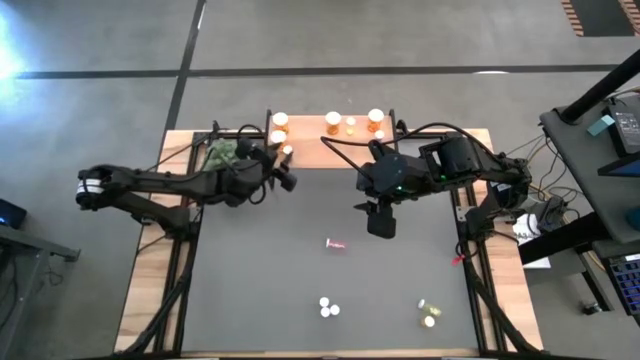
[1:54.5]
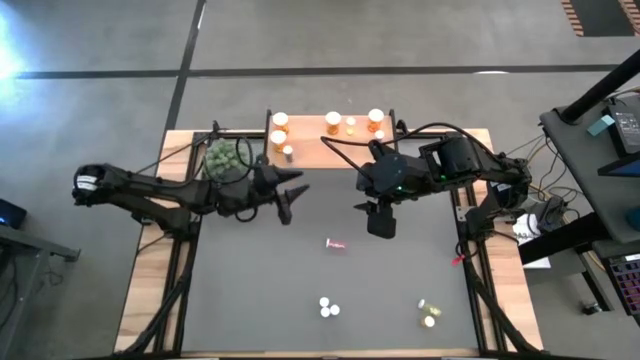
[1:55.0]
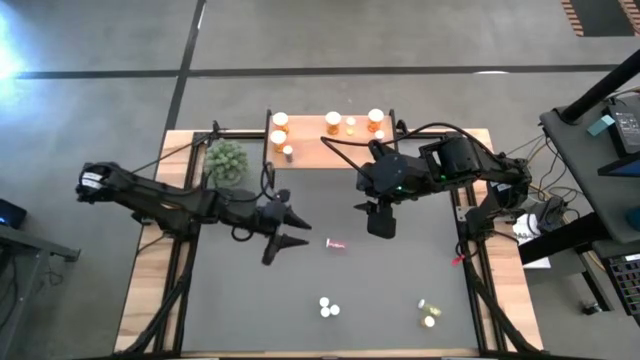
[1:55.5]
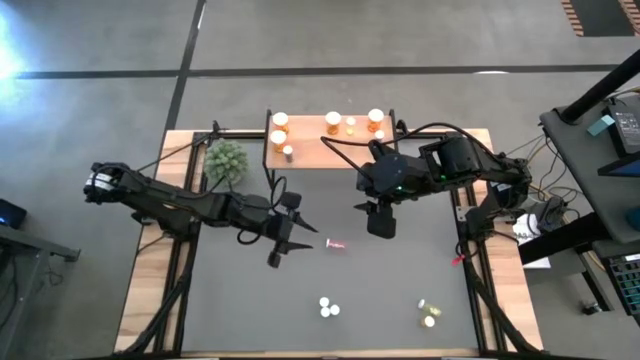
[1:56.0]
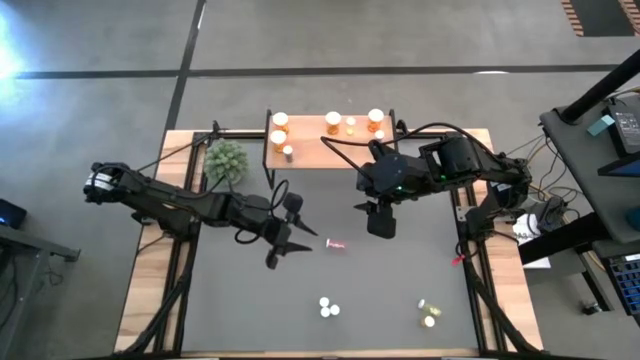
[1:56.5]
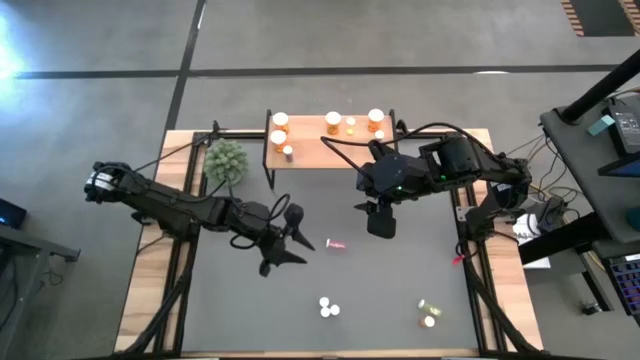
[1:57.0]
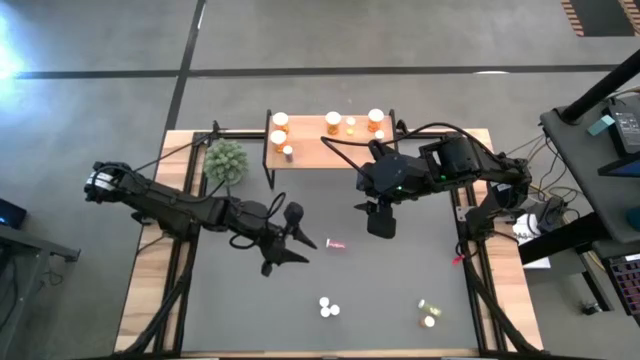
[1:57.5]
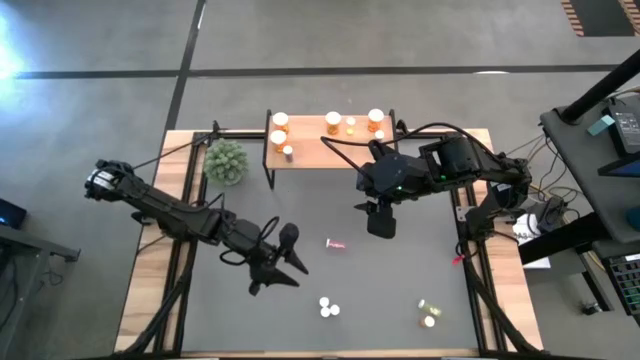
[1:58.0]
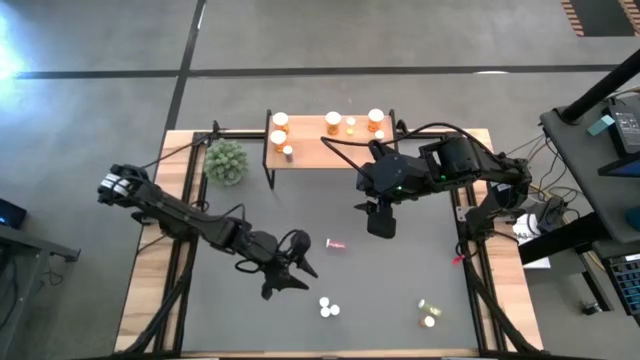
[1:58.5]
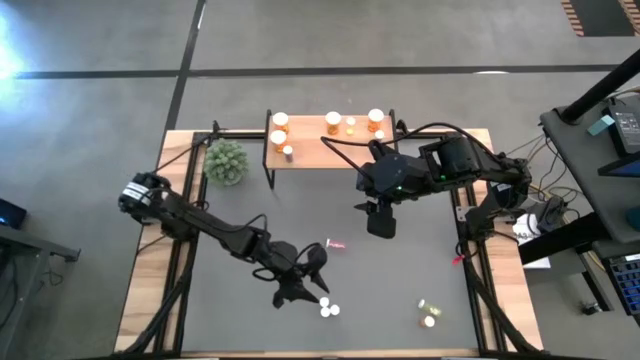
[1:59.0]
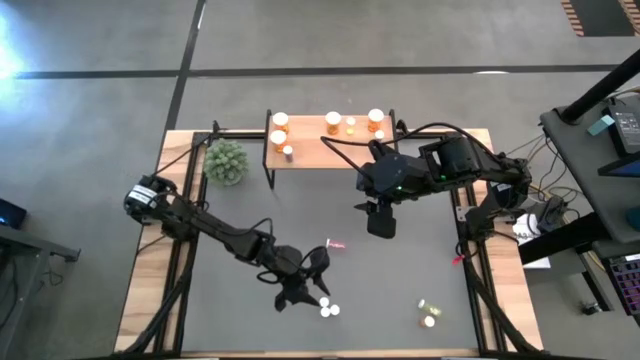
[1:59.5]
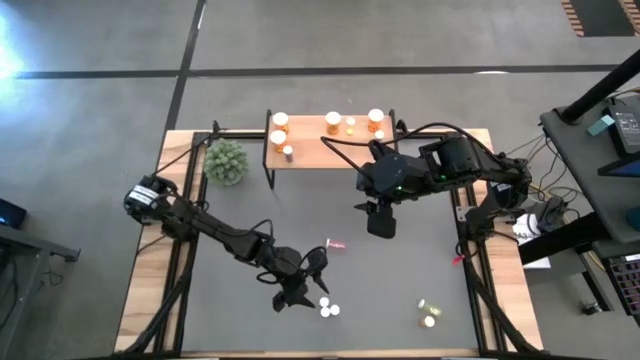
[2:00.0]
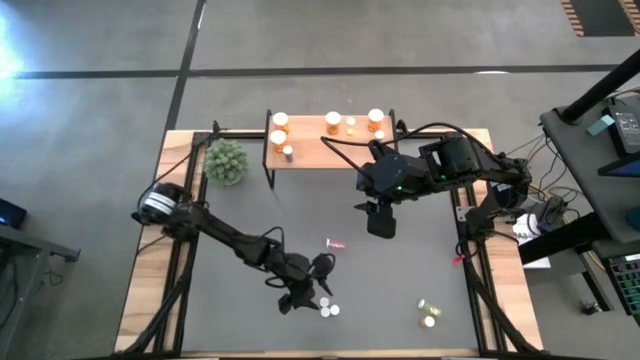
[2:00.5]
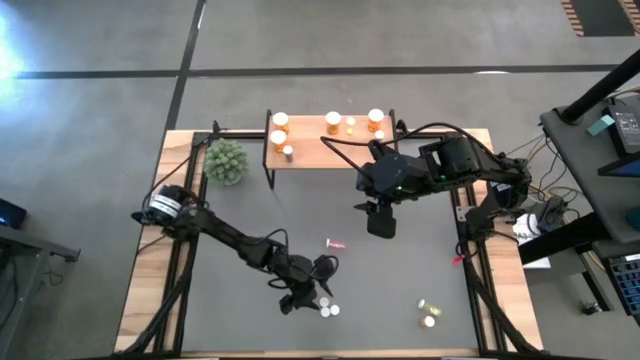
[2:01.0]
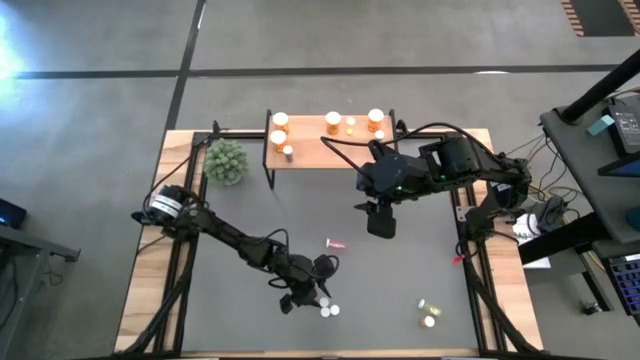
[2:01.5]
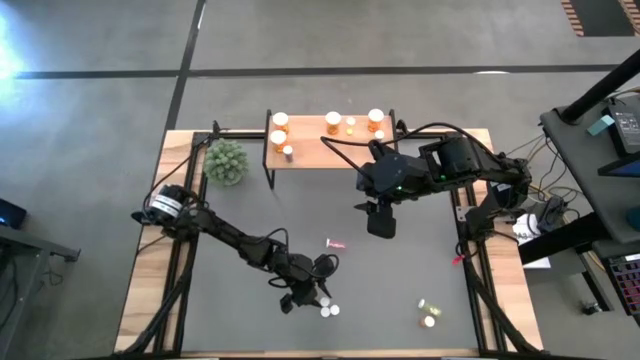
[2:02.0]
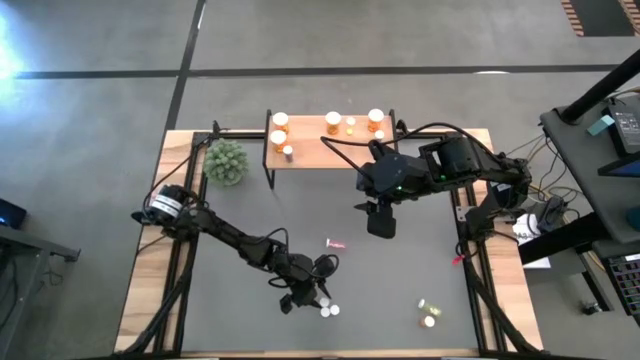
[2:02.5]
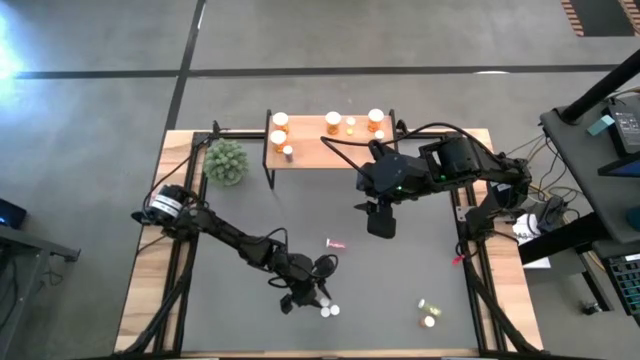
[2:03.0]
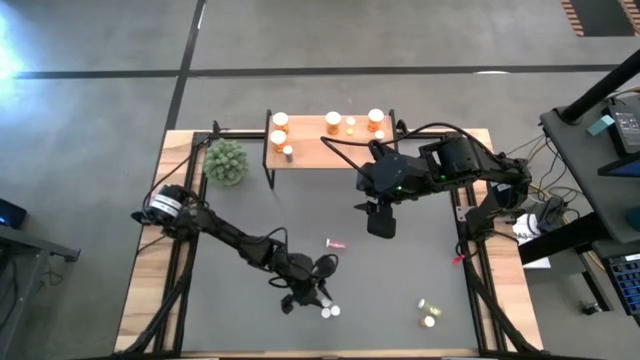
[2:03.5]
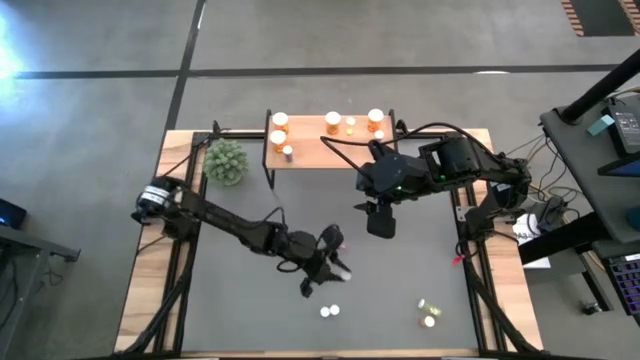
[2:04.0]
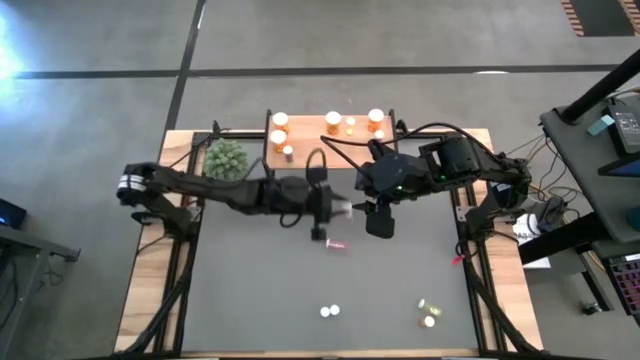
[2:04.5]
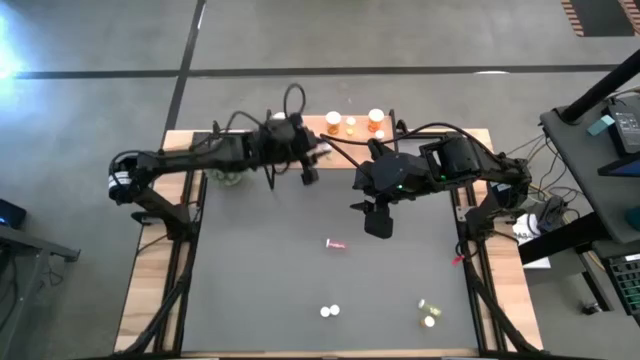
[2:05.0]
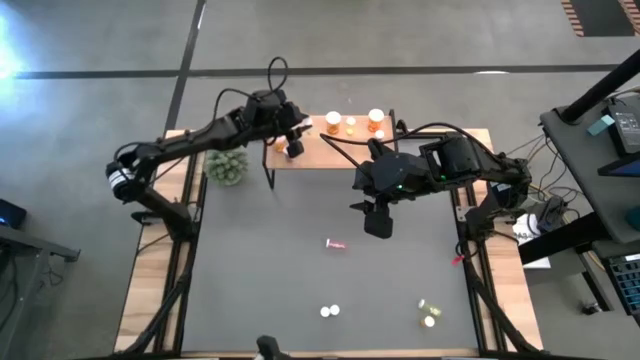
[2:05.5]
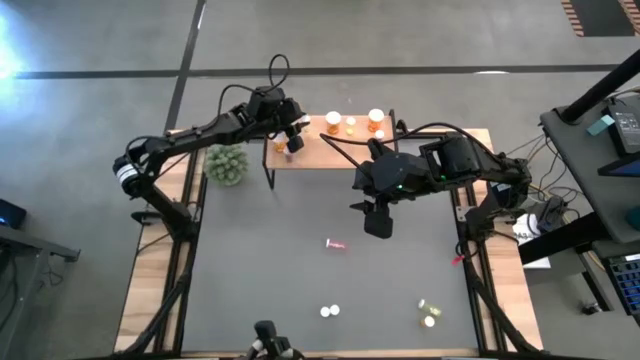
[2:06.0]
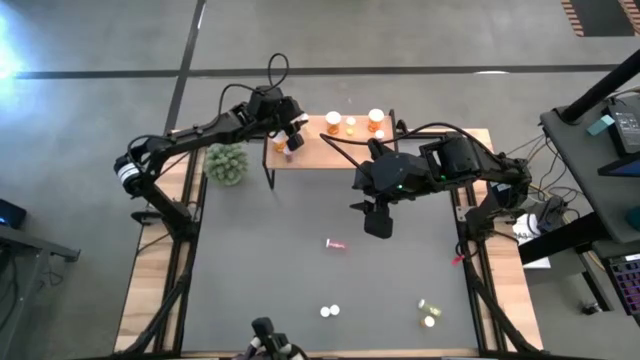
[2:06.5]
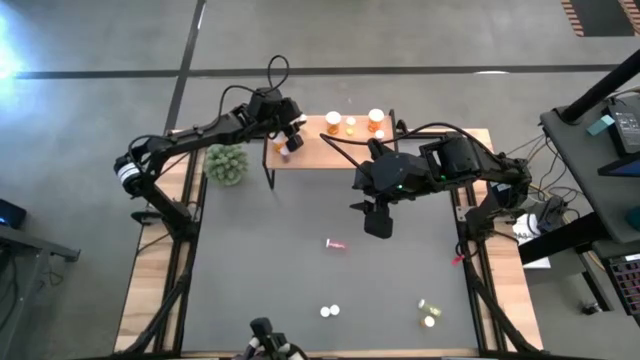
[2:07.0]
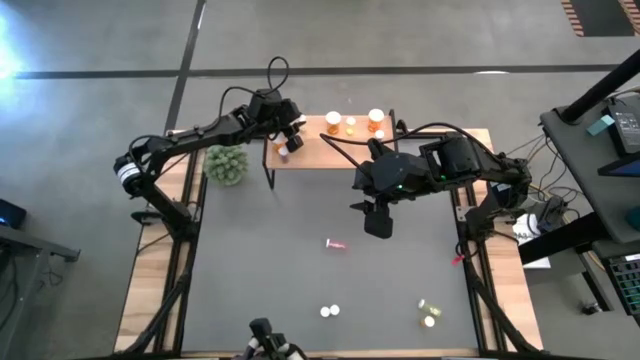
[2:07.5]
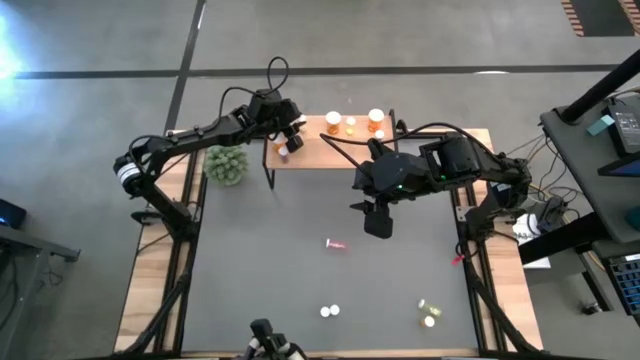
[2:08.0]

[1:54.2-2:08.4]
Task: Pick and place medicine bottles onto shelf by color
Put the small yellow pill bottle on the shelf

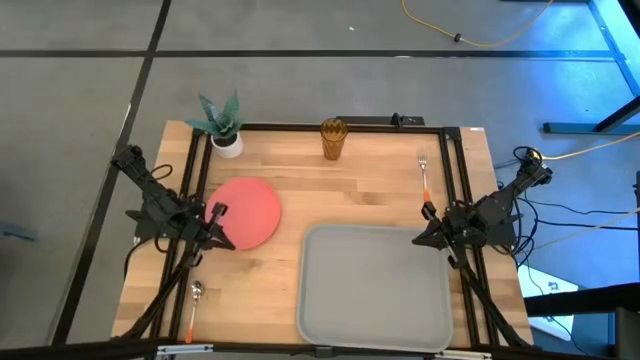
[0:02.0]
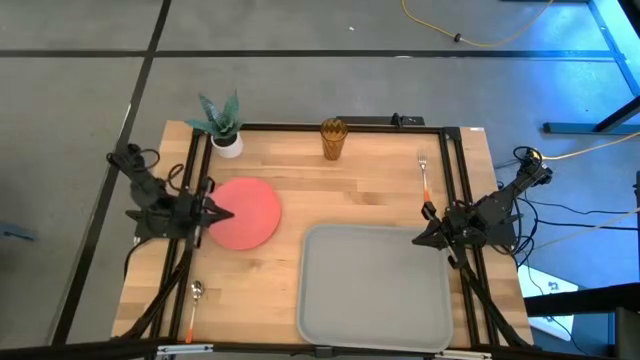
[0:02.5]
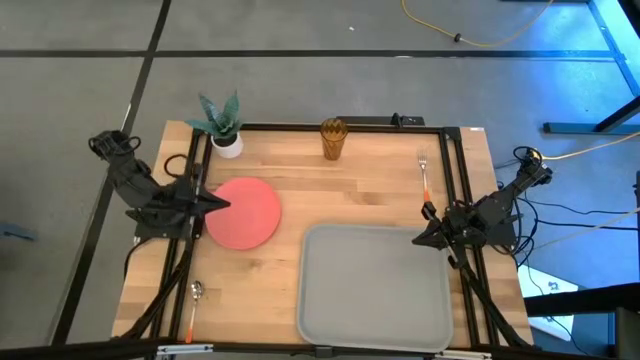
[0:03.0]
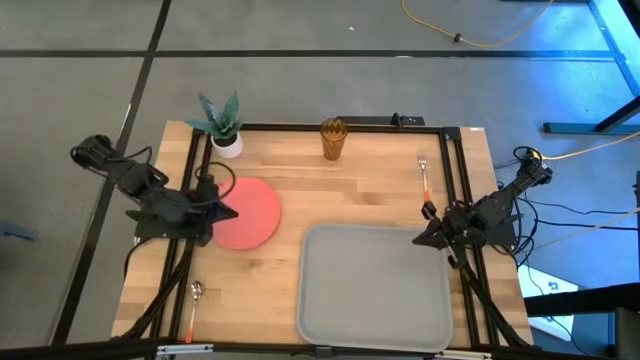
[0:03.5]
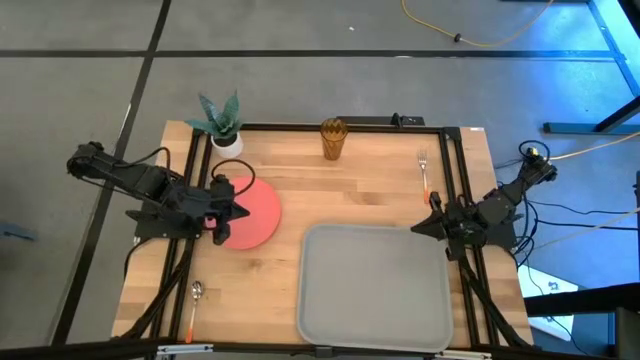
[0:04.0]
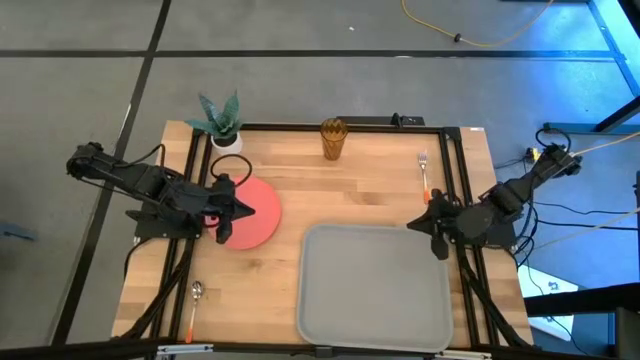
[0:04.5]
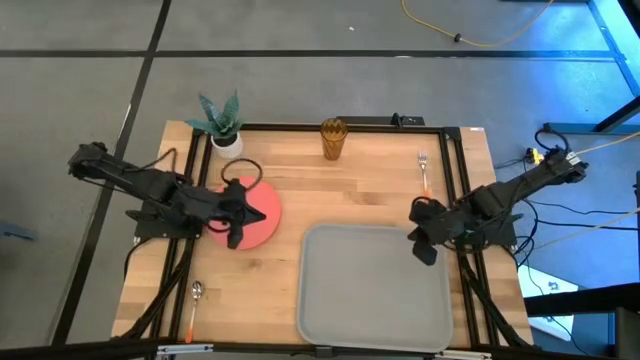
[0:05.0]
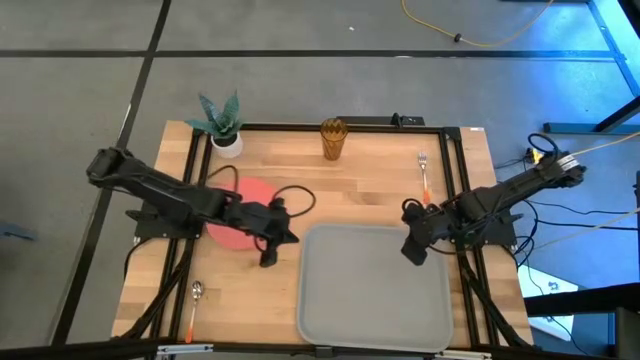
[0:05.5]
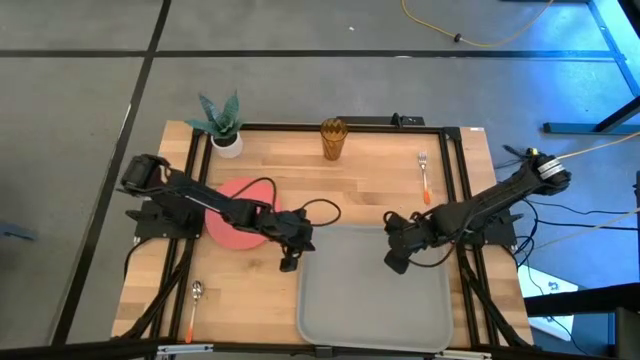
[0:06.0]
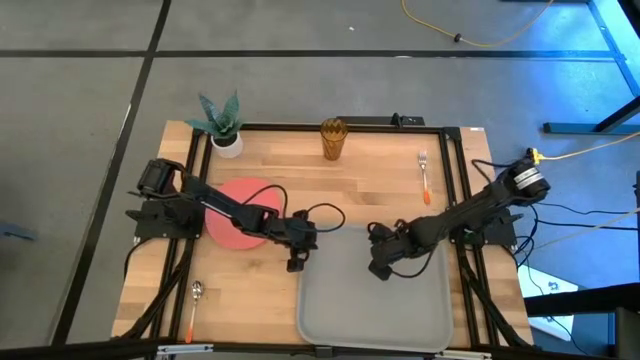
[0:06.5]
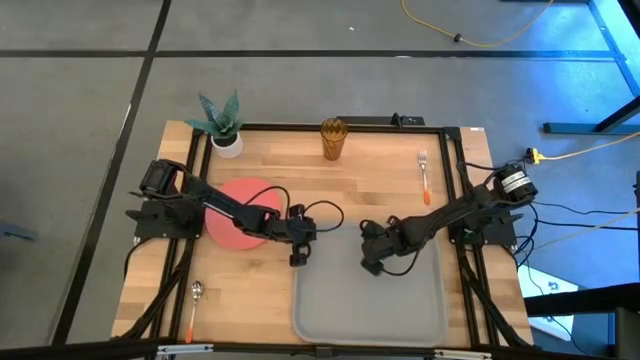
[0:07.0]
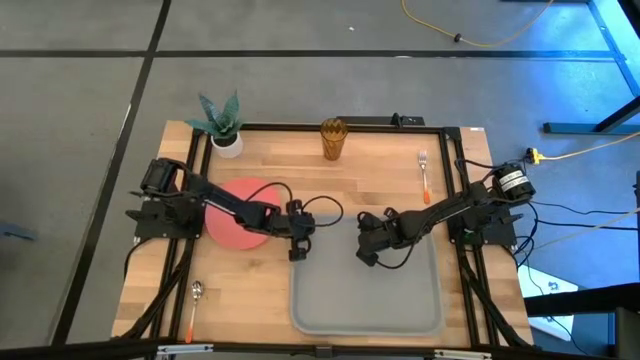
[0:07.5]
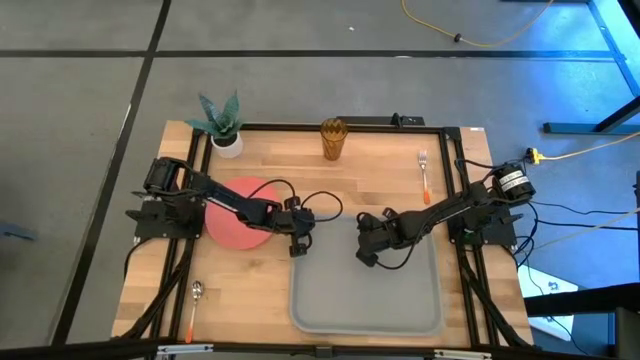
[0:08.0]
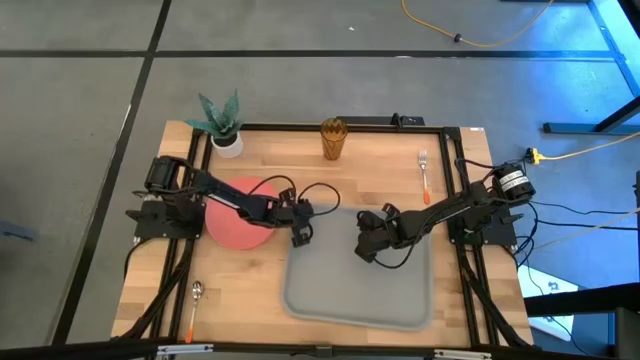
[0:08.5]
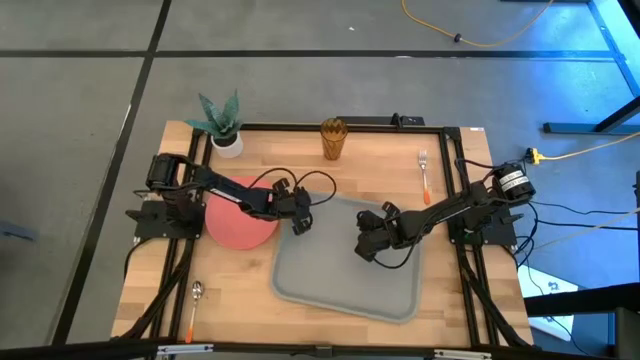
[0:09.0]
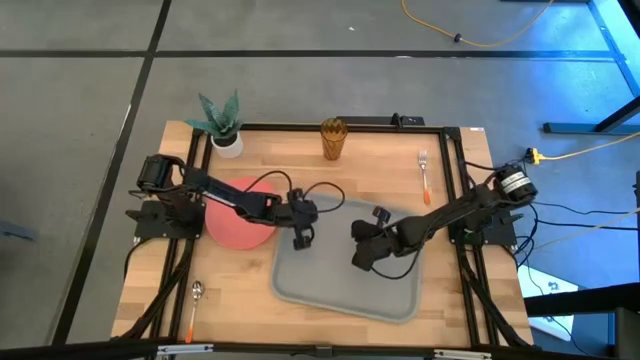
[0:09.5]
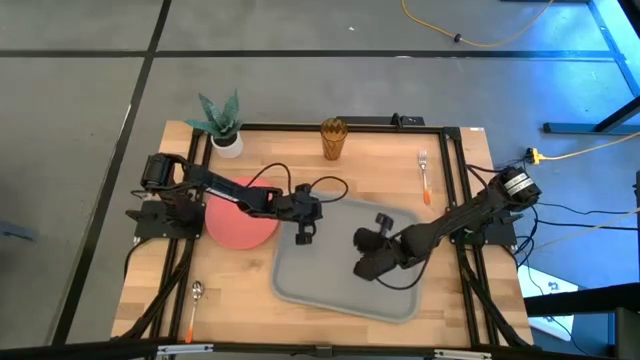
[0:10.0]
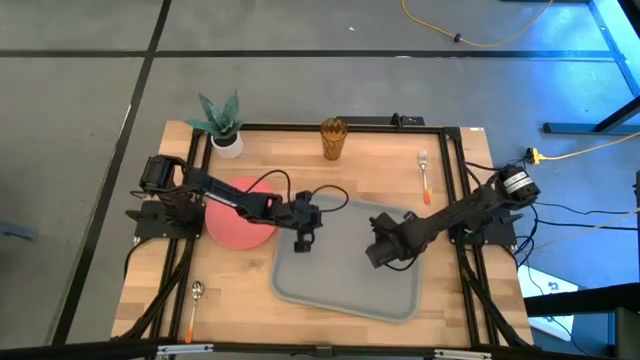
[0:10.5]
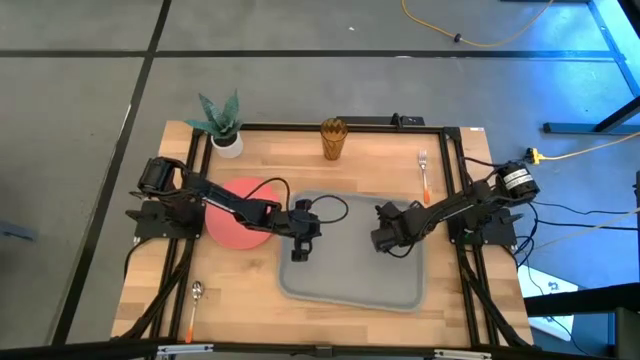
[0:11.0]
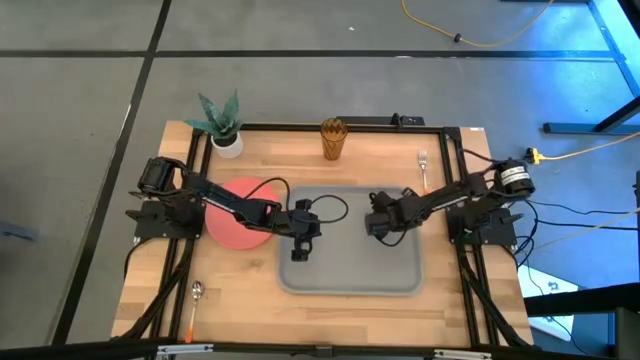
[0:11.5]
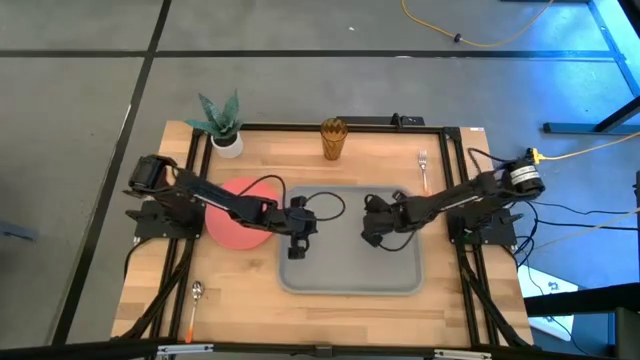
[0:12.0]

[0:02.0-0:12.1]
Task: Pick and place plate/cup/fork/spoon on tray
Move the serving tray to the center
